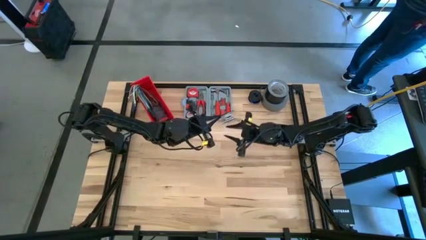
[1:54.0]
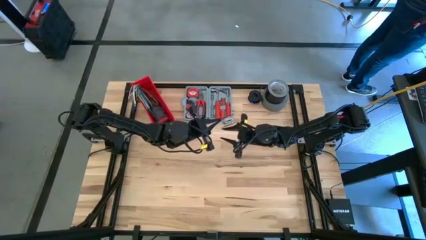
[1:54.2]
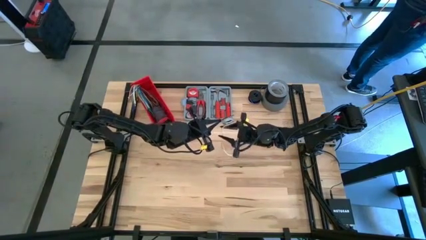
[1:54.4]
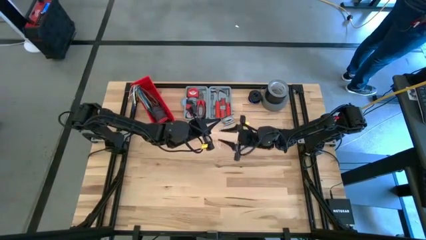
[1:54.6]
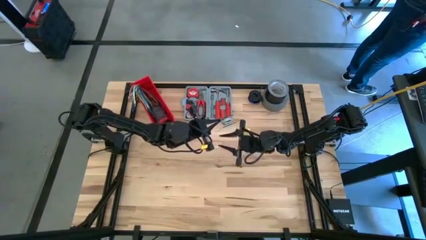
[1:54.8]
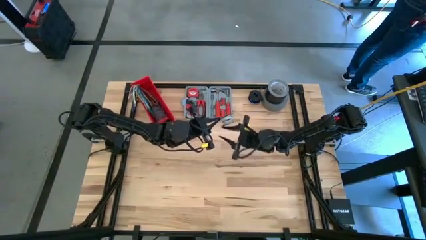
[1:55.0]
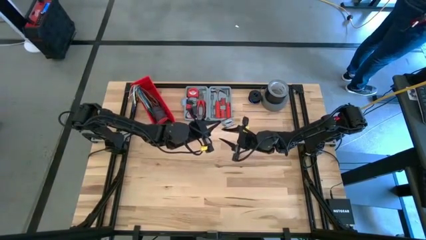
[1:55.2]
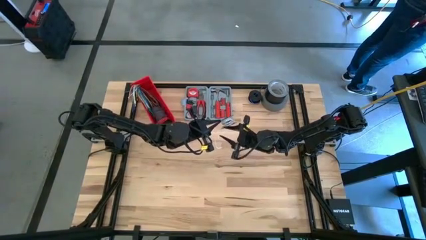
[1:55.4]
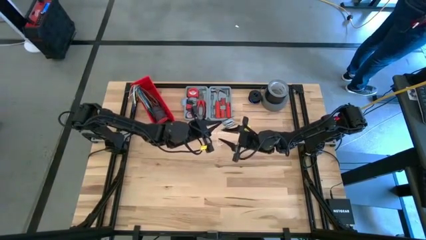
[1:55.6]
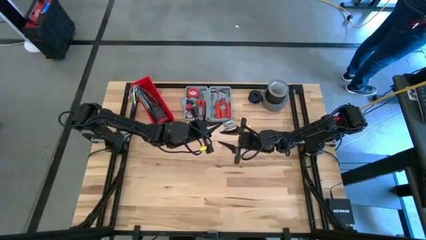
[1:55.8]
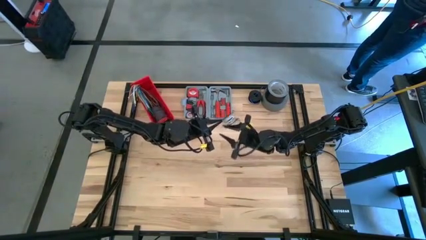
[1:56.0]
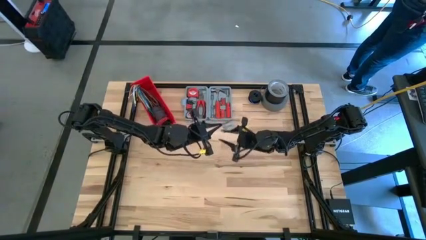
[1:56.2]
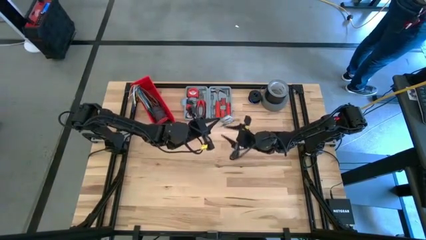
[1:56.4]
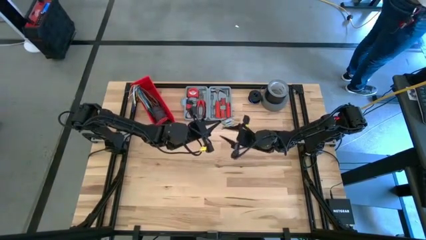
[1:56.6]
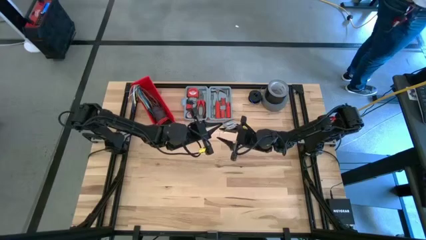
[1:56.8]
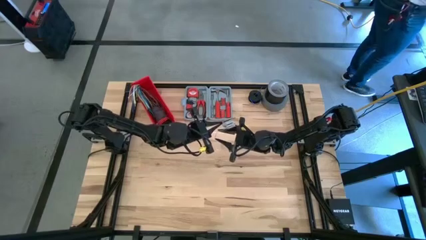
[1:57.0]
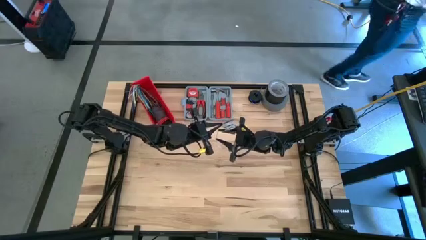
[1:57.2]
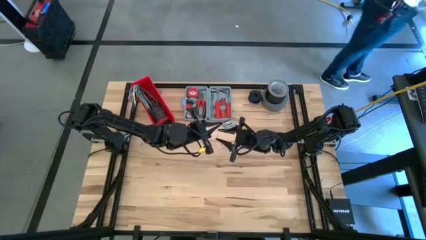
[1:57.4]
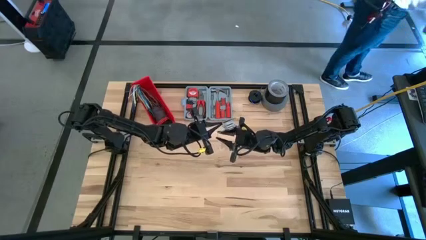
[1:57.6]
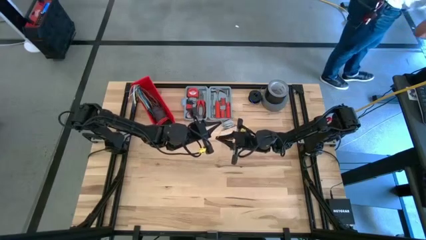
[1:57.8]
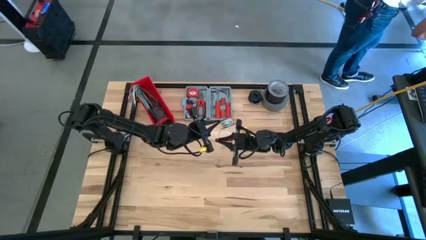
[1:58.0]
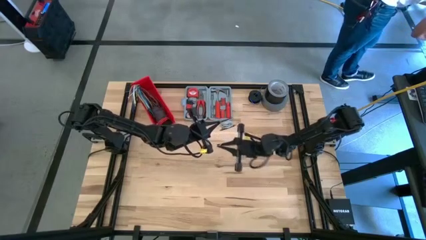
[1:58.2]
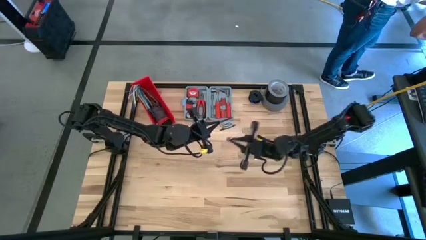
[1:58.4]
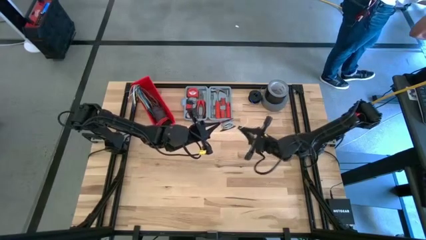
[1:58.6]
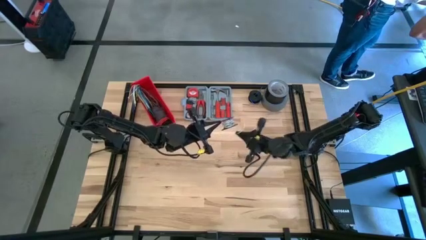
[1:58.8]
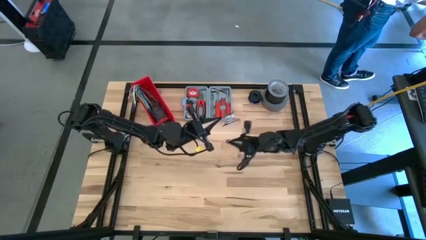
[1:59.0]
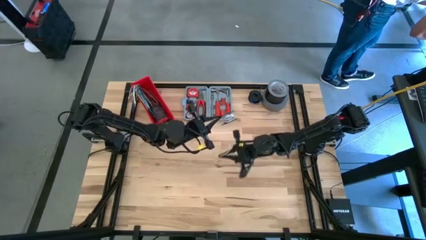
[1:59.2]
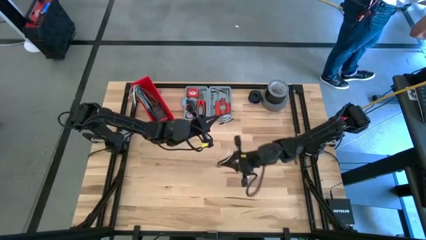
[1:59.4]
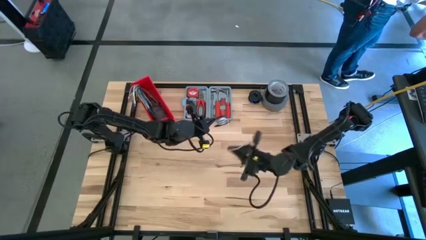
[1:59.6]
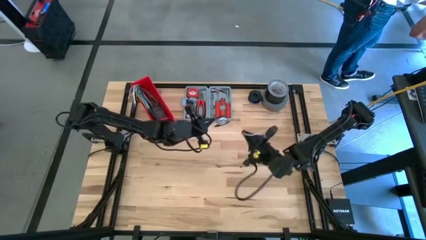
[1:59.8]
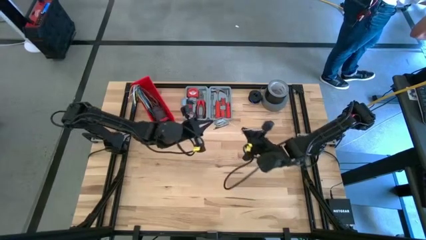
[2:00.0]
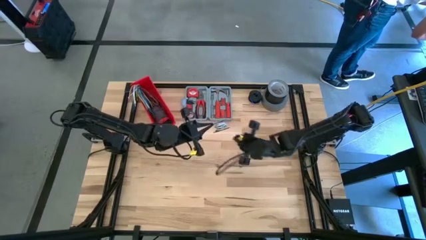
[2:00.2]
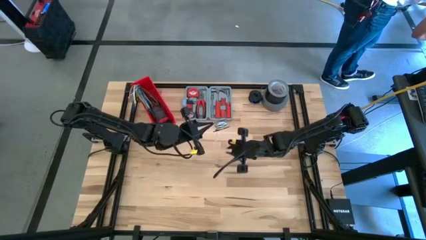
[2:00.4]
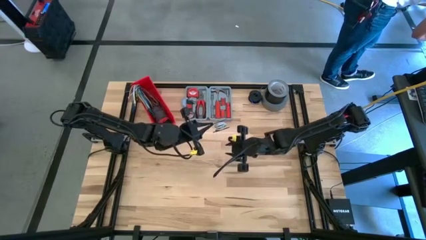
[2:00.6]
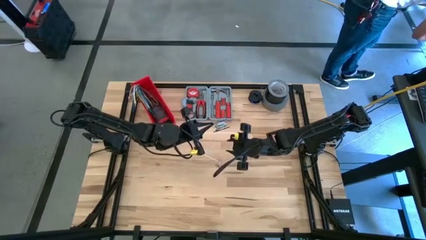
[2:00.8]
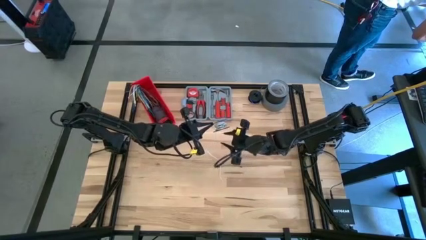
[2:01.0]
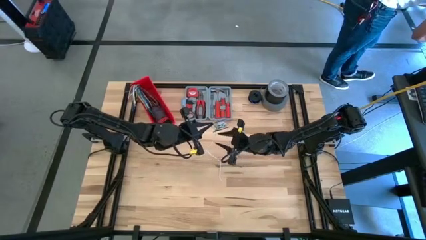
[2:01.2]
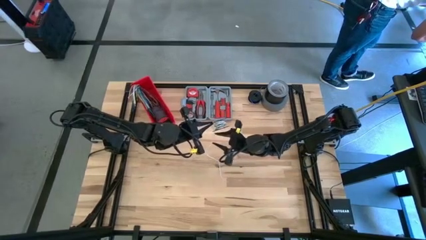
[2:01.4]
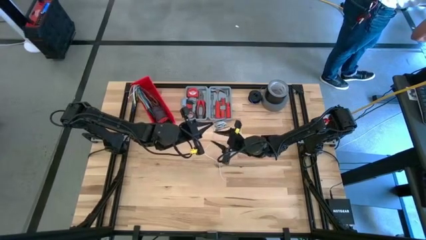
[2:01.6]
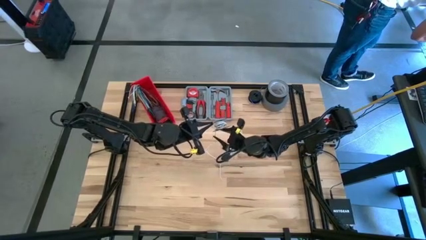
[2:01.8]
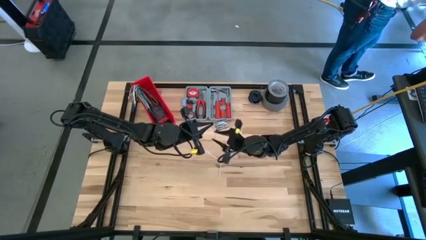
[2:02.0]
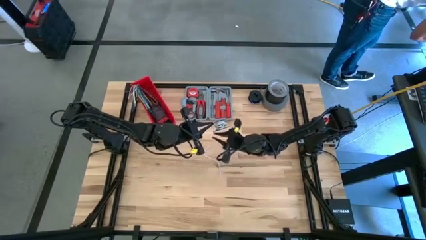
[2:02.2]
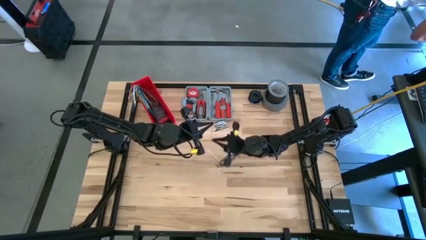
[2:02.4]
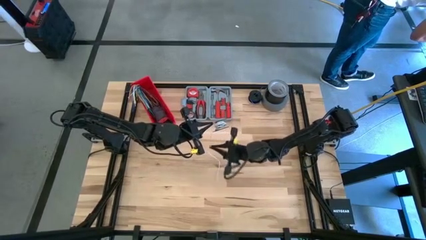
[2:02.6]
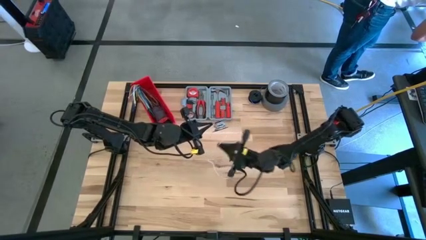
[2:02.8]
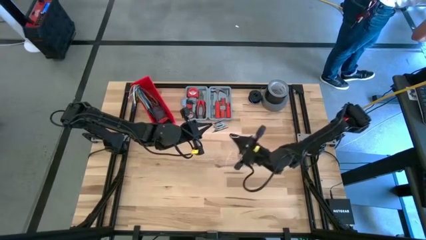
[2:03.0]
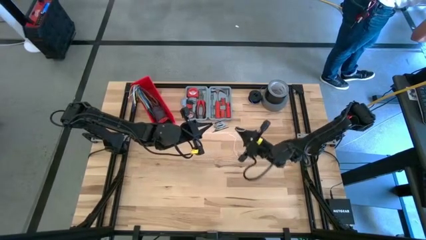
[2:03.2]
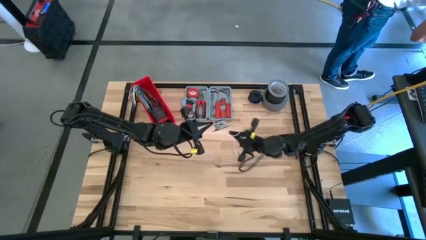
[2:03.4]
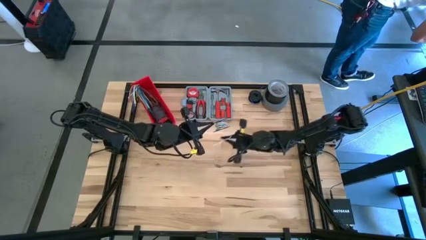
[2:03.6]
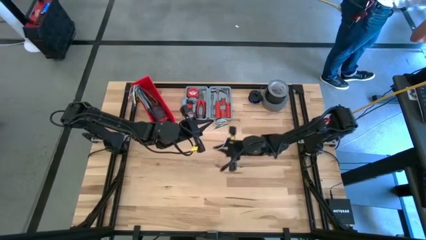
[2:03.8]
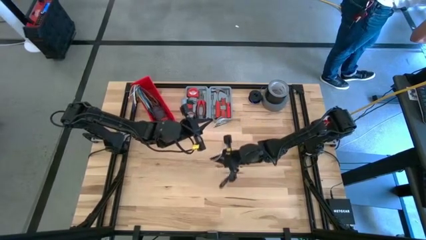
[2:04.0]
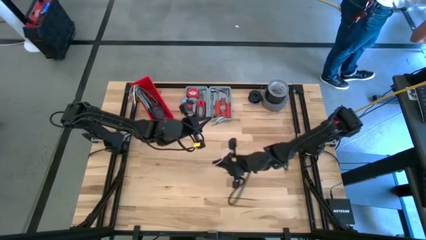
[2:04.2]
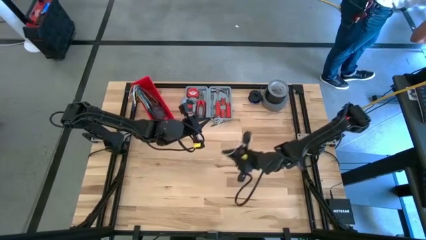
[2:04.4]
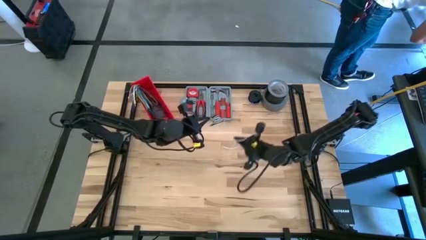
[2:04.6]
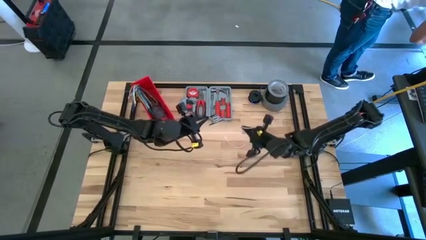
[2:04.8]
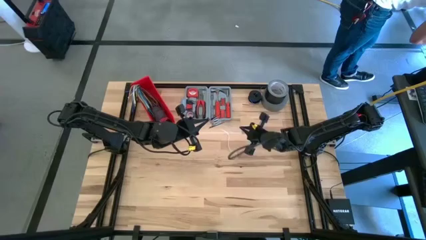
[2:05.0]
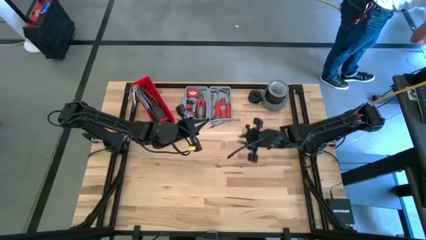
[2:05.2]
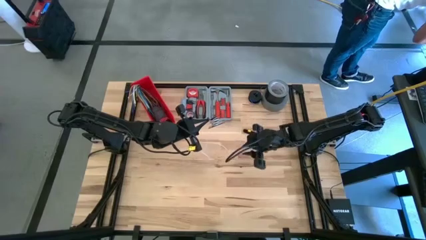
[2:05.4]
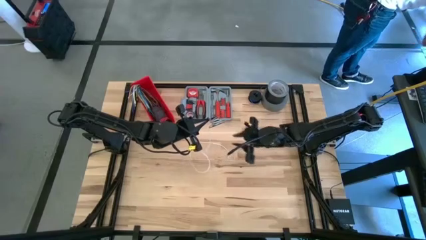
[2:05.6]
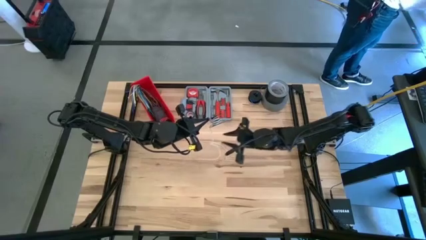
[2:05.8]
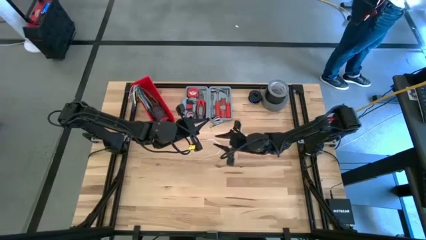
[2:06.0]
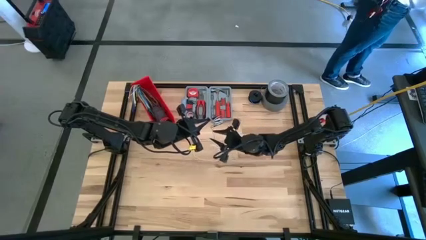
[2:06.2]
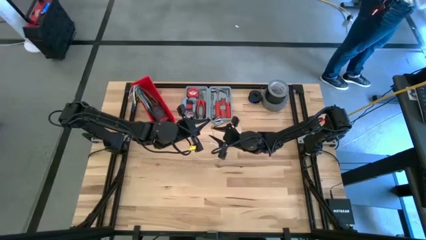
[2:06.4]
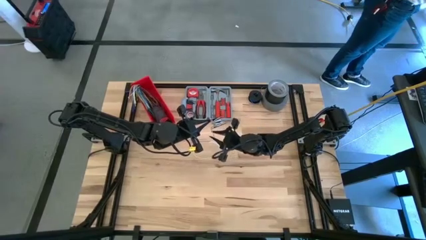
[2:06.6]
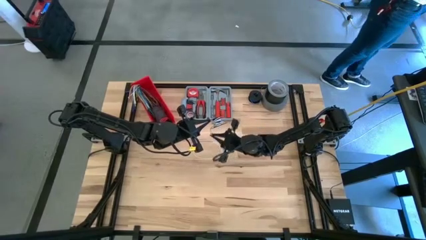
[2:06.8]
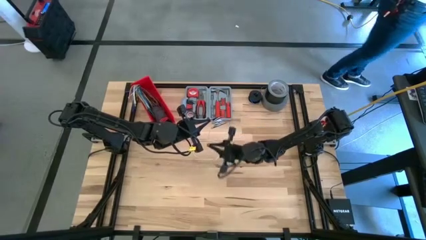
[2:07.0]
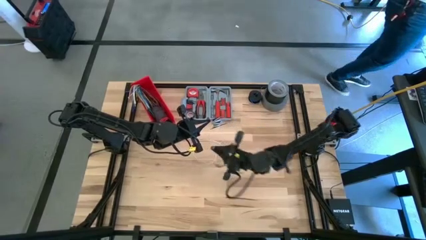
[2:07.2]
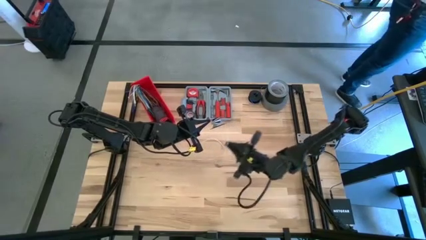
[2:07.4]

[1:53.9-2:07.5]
Task: Coil cords
Uncoil the white wire from the spool
